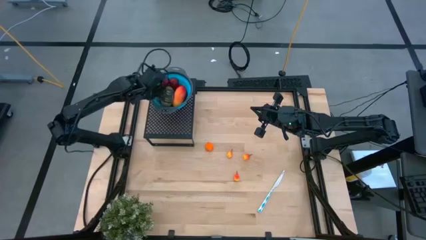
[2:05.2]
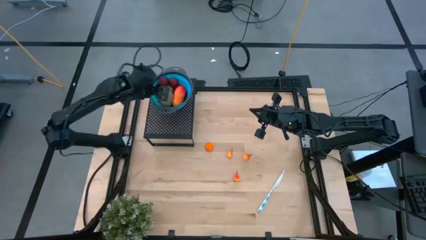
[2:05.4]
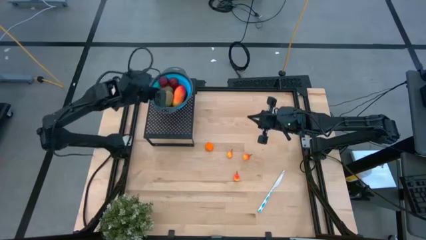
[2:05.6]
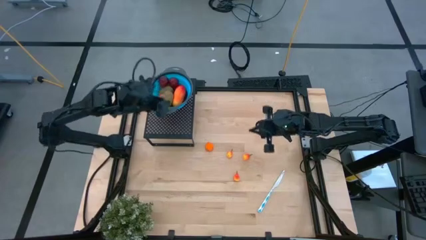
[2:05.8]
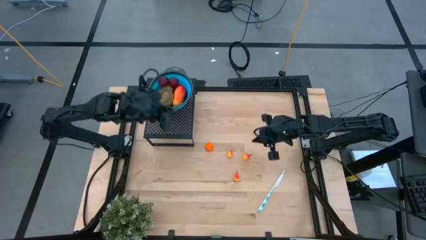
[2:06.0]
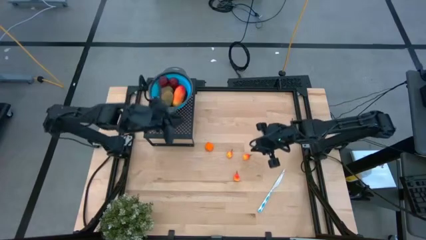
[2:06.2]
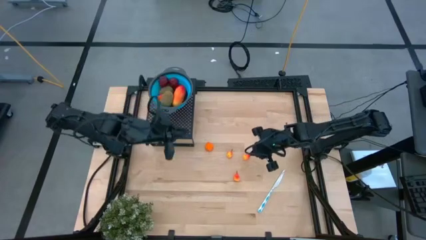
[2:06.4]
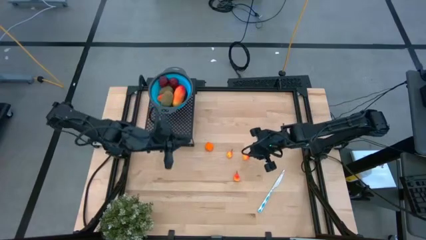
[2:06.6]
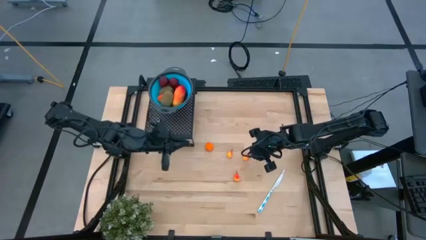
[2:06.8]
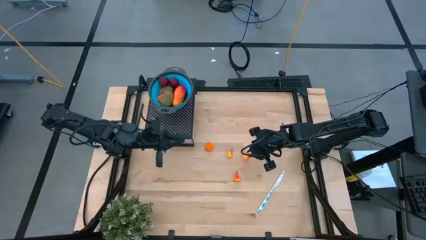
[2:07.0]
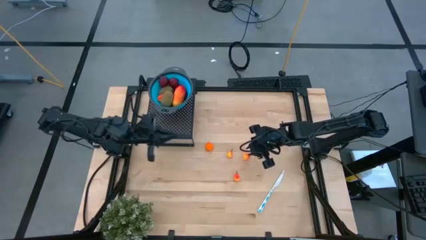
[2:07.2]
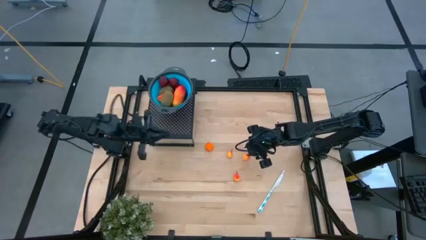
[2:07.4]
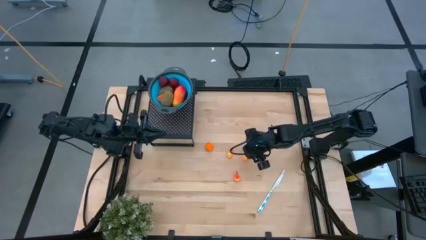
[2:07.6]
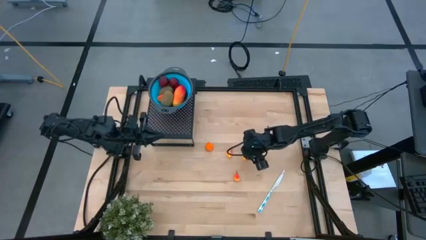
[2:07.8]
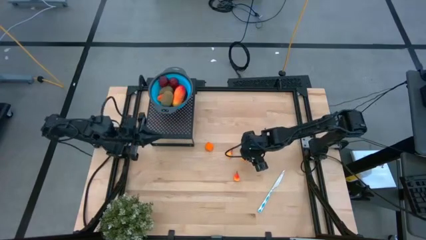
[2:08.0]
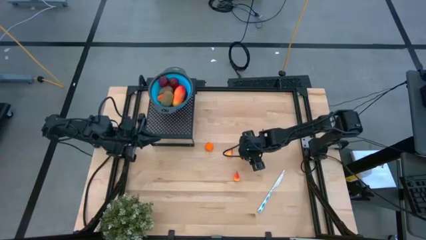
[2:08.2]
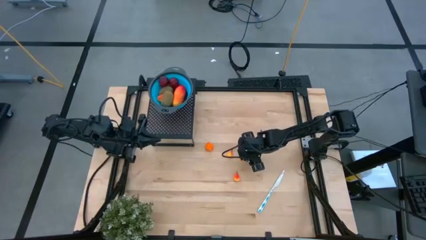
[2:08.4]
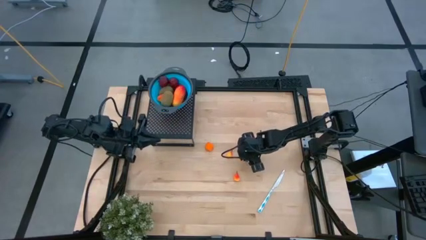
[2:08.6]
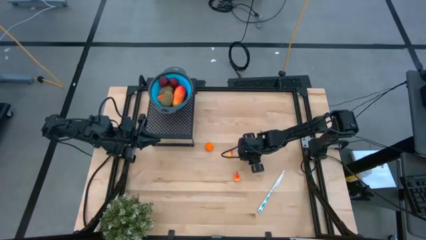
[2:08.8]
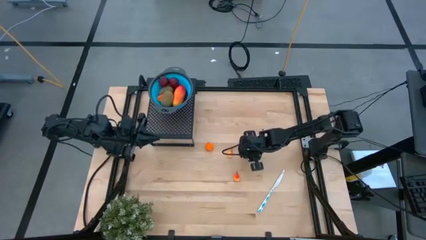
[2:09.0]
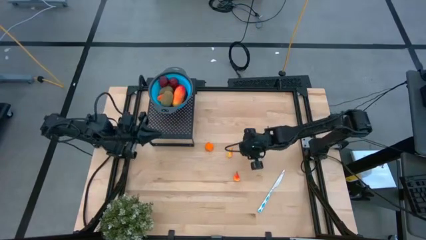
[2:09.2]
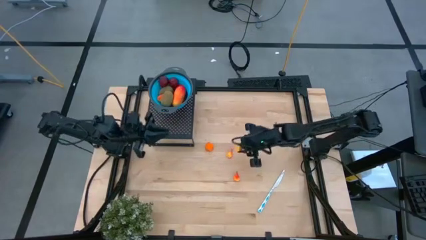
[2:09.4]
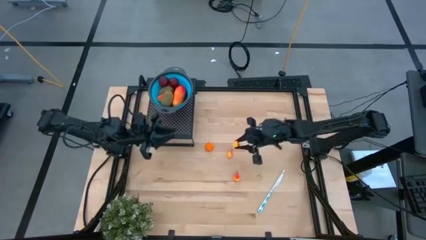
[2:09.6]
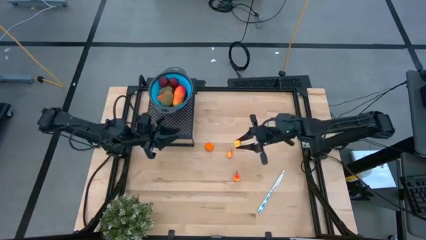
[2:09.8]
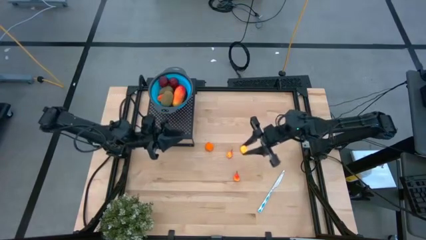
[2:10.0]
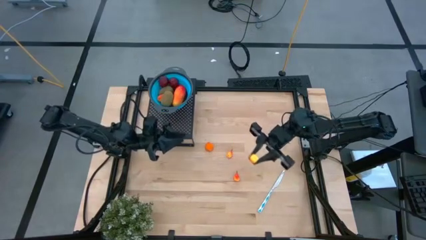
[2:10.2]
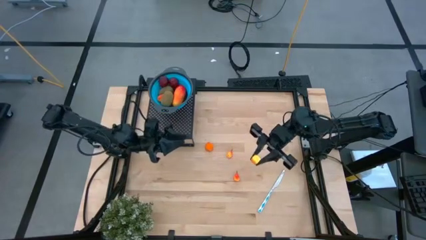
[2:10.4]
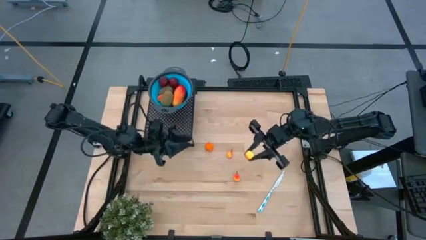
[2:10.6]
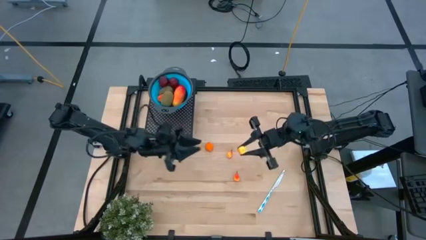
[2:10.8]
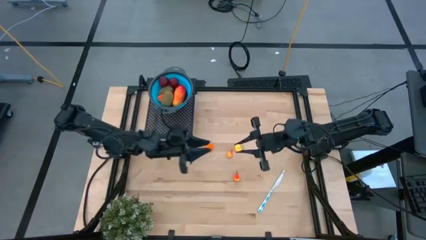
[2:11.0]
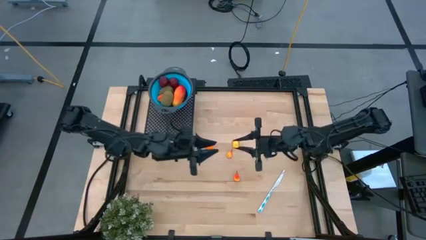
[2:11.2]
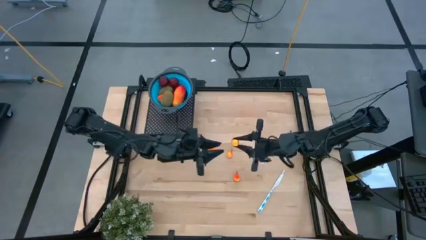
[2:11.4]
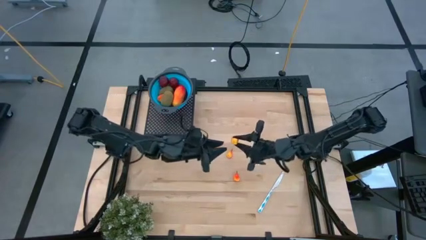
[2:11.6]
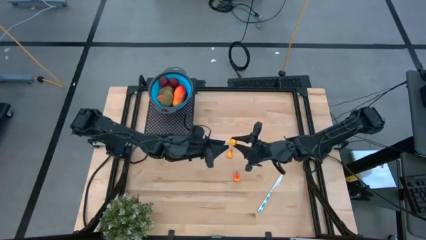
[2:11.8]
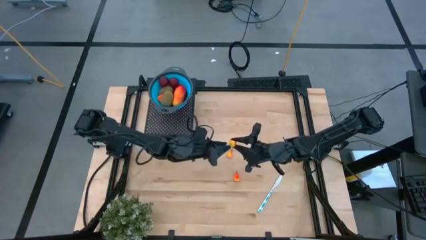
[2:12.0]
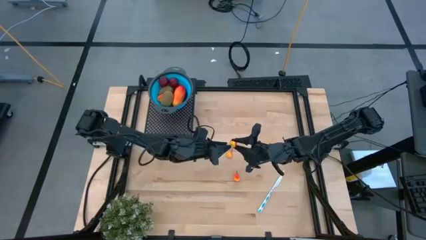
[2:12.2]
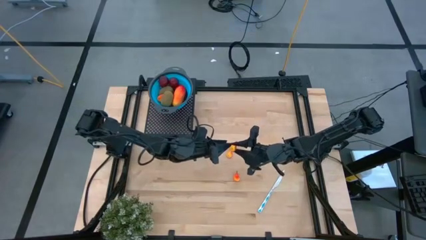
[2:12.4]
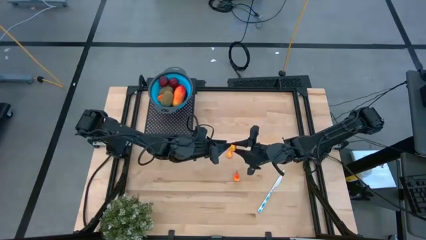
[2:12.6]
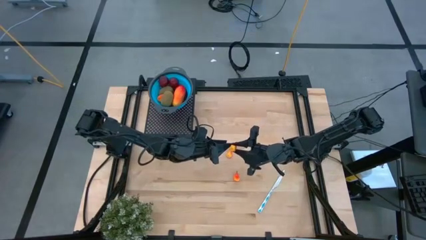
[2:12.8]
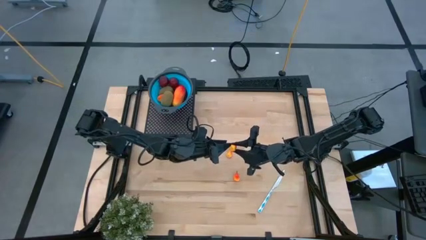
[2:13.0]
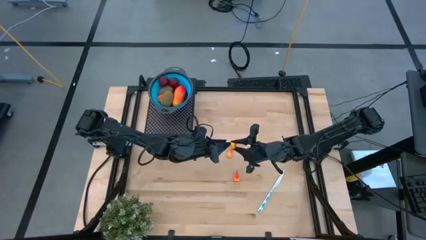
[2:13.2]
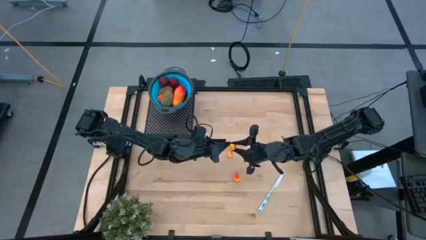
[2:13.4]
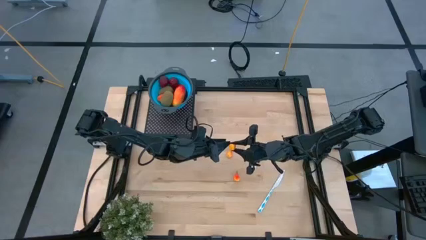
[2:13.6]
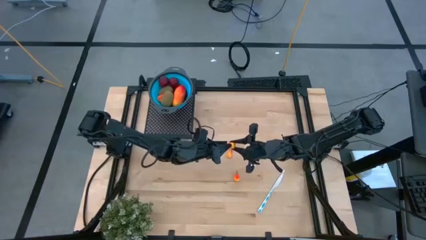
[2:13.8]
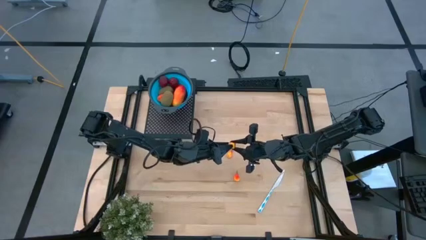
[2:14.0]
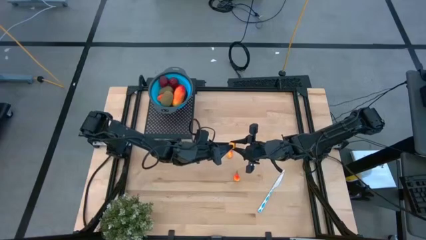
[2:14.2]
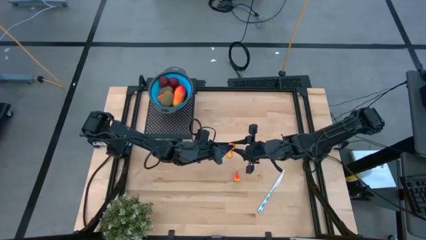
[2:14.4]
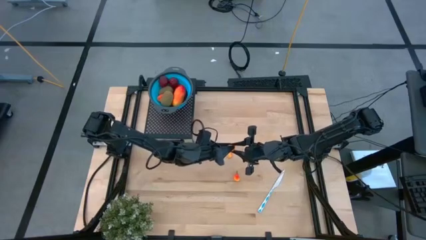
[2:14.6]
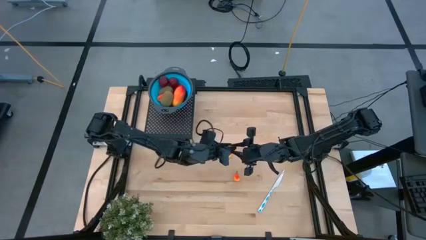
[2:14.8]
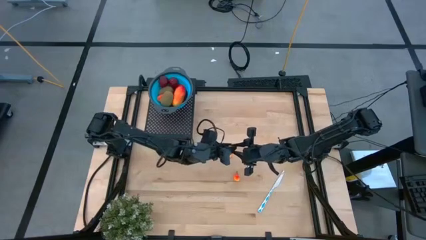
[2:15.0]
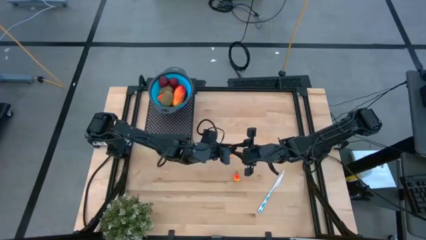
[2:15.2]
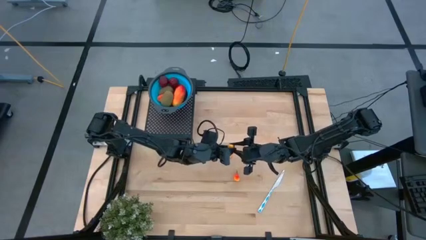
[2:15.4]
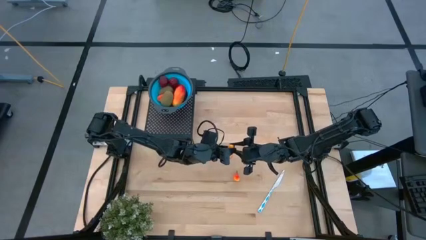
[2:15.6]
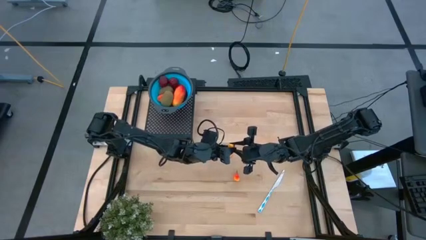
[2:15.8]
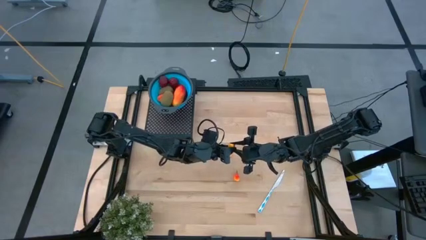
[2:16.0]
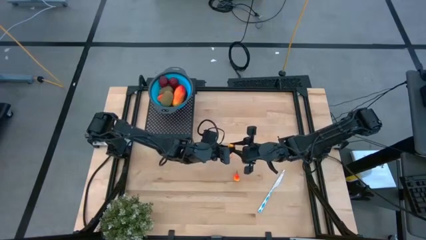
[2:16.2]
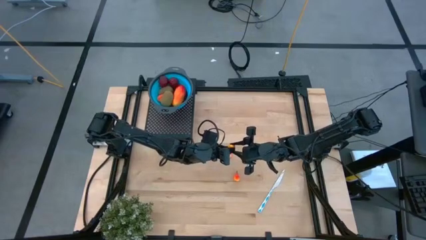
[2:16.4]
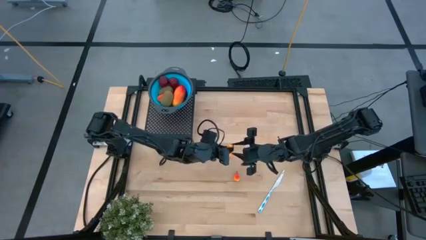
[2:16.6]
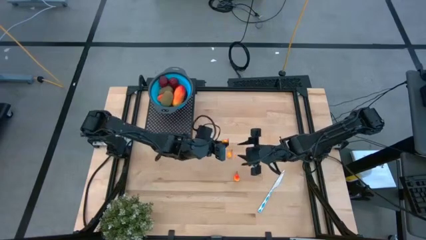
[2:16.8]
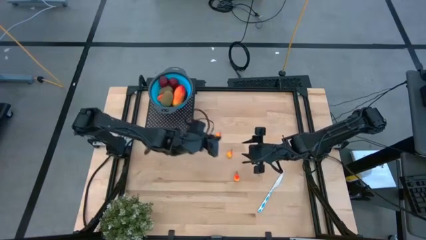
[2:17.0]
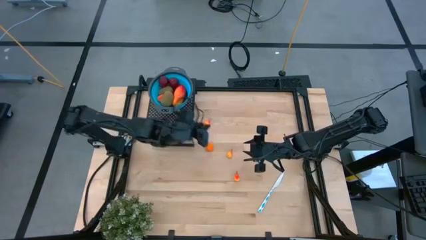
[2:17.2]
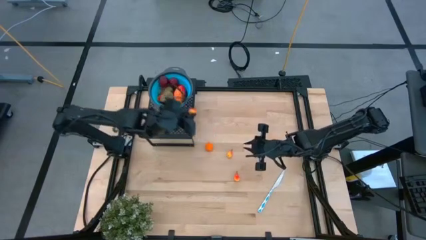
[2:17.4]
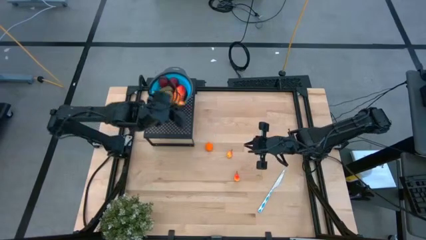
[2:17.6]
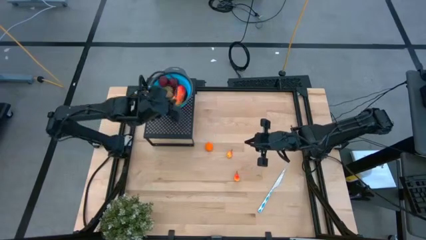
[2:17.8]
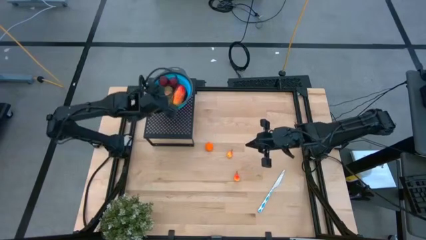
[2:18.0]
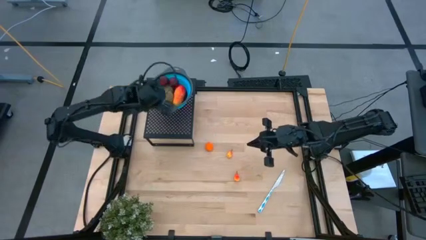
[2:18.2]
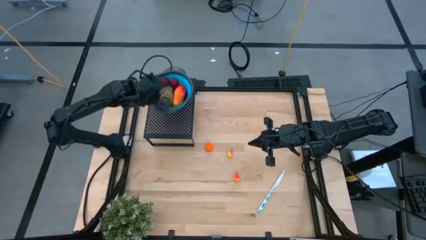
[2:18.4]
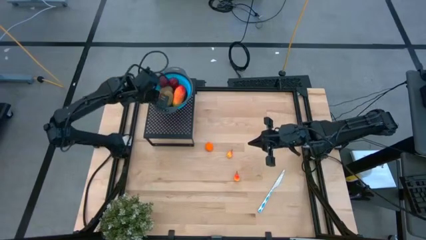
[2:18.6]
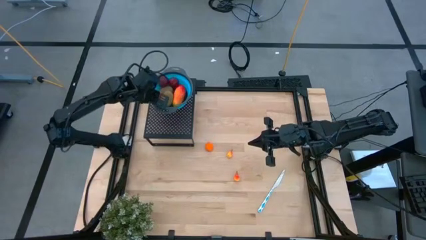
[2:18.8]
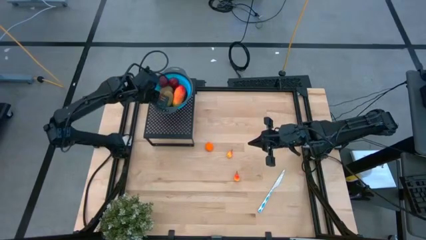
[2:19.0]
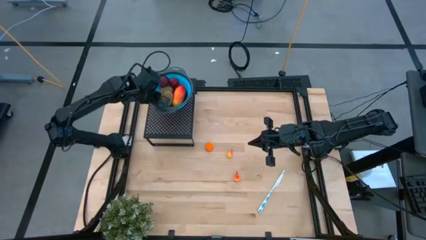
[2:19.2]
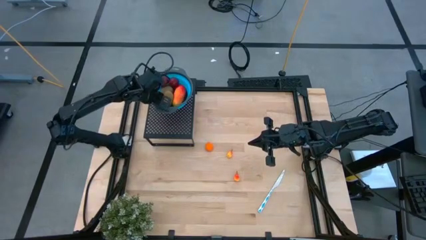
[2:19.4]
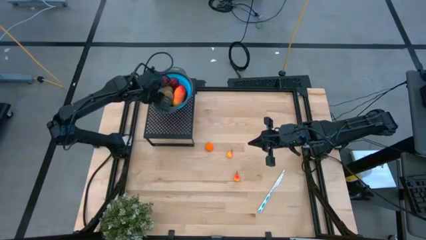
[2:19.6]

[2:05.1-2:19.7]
Task: Pick & Place Fruit
Put the right peach into the blue strainer bowl on the shelf

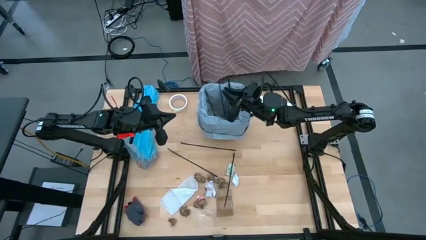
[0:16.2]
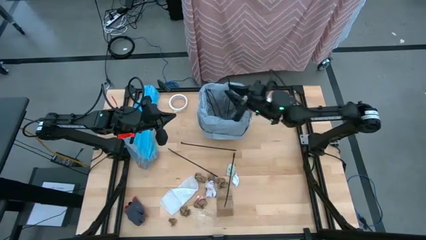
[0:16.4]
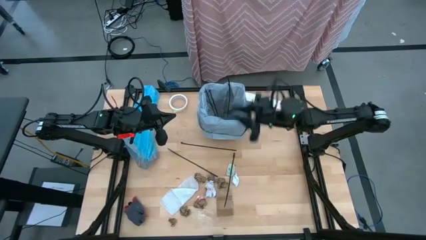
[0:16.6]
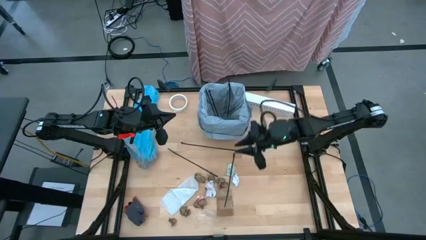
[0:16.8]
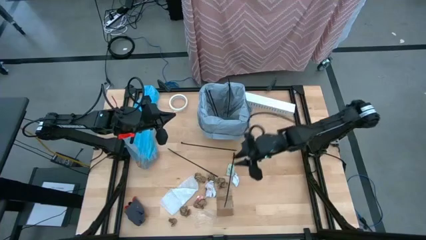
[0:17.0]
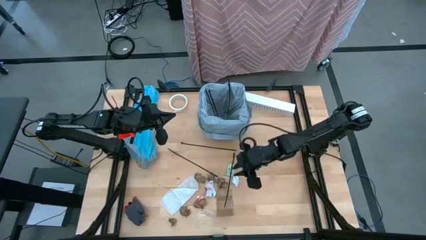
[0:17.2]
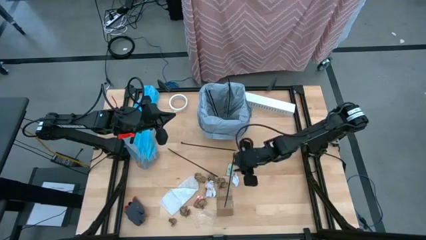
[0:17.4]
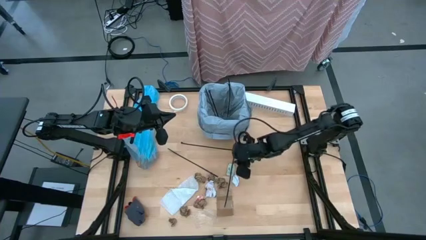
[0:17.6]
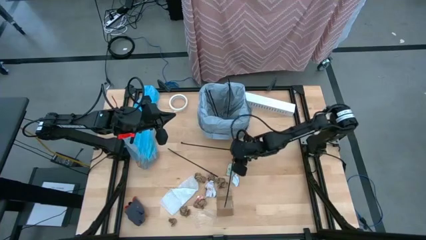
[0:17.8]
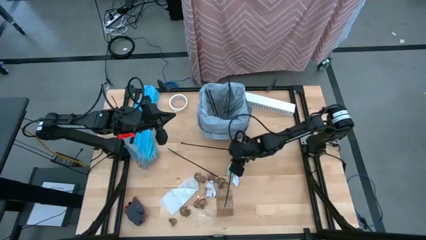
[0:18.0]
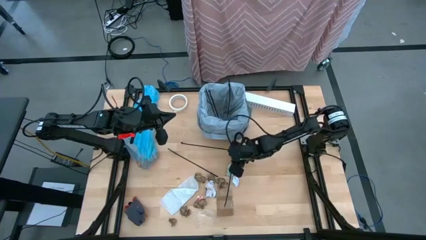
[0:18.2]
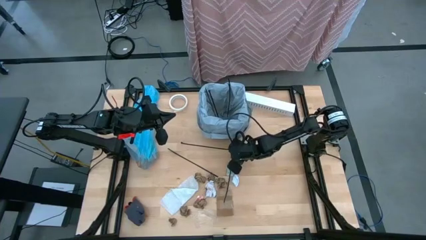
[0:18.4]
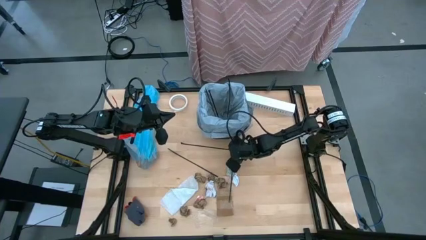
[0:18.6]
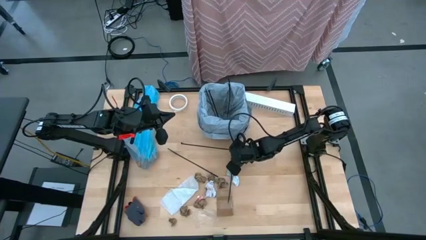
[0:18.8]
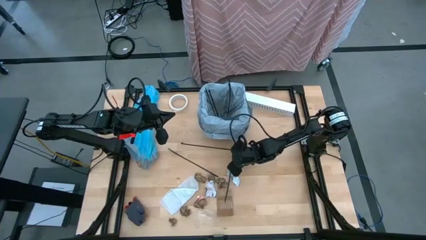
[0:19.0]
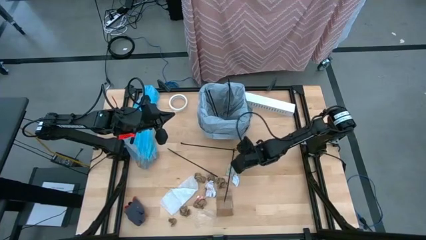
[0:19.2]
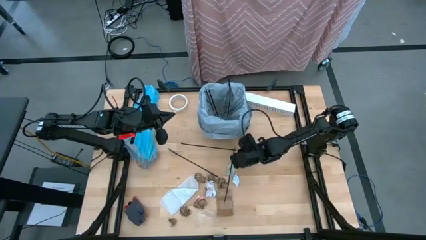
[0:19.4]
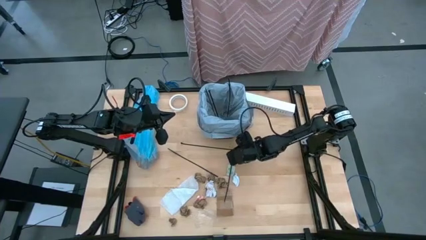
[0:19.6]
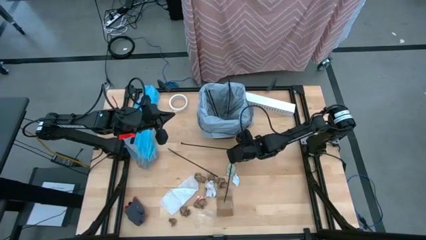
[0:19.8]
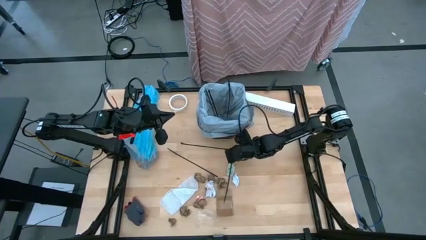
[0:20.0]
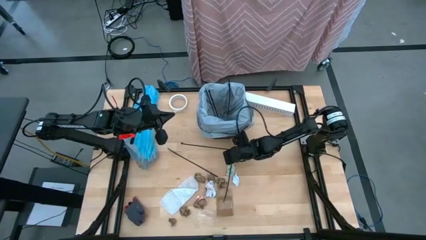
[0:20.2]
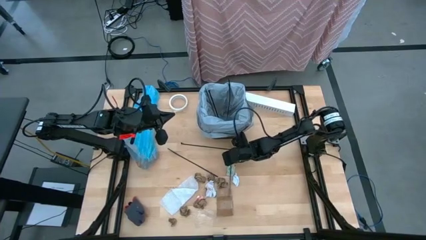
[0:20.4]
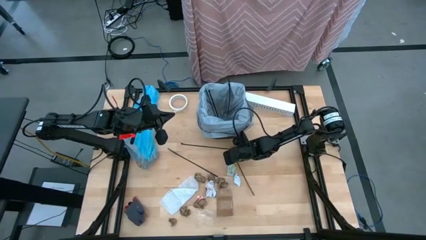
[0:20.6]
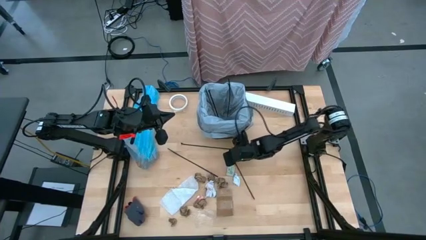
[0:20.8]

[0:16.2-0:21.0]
Task: place trash/remove bag and relplace
Put the zip tie into the trash bin
